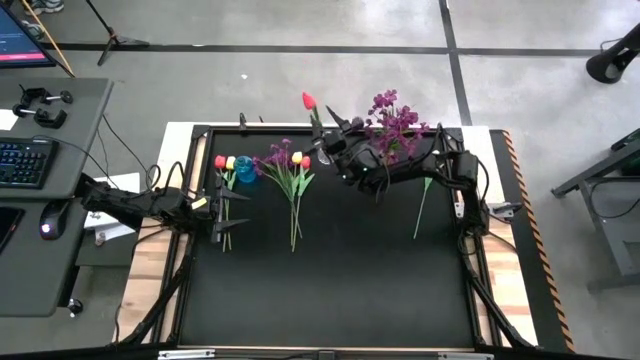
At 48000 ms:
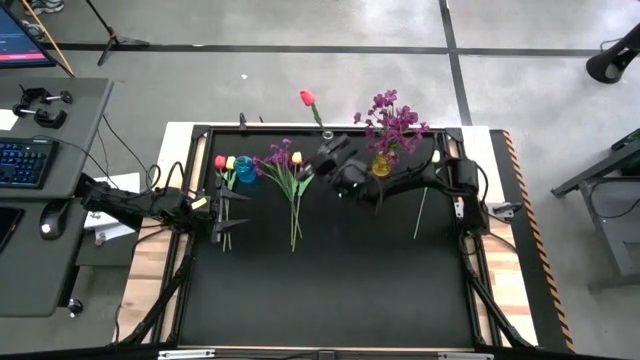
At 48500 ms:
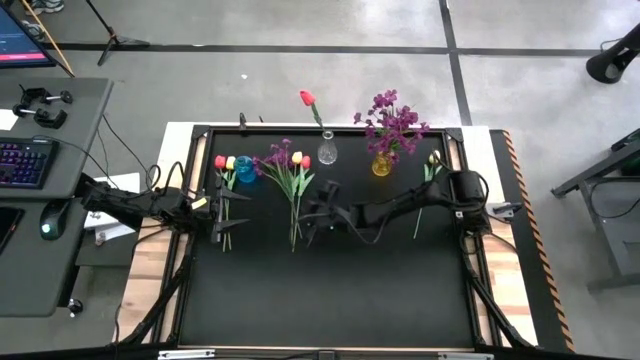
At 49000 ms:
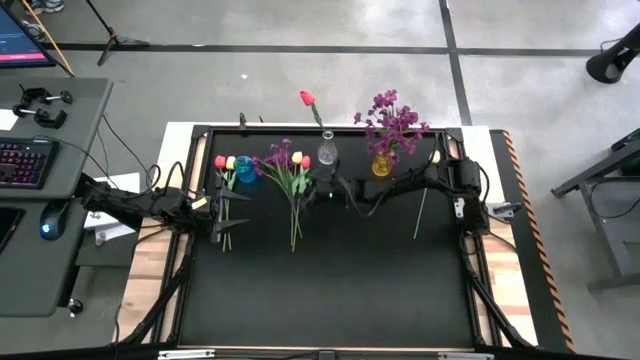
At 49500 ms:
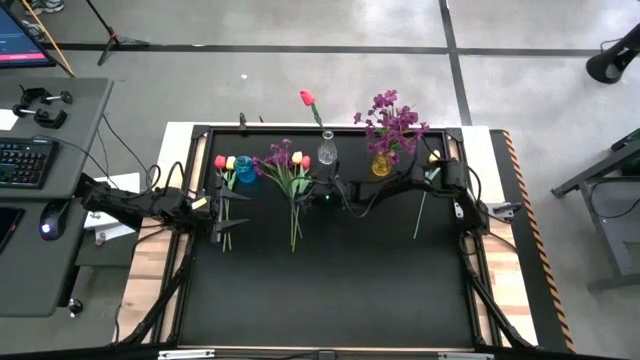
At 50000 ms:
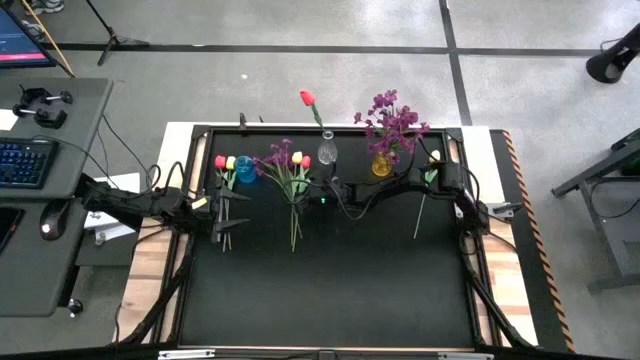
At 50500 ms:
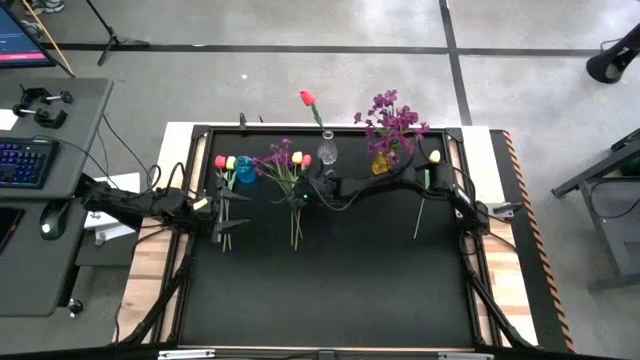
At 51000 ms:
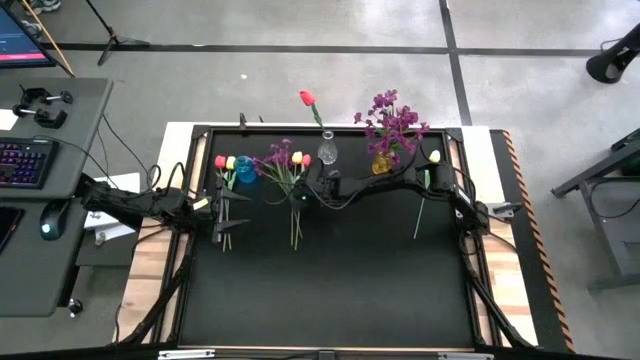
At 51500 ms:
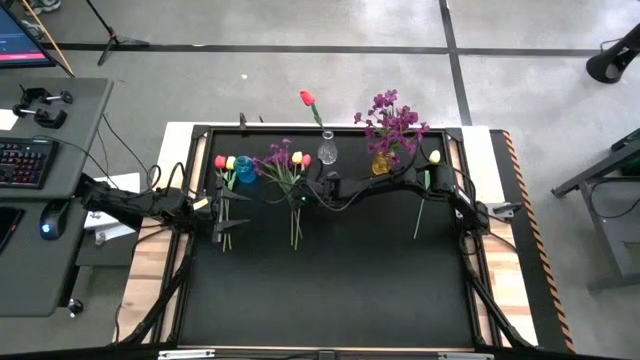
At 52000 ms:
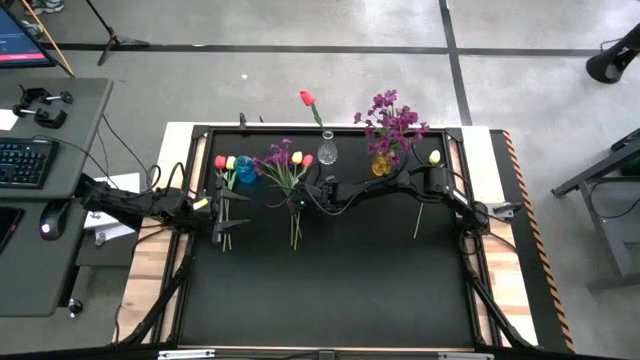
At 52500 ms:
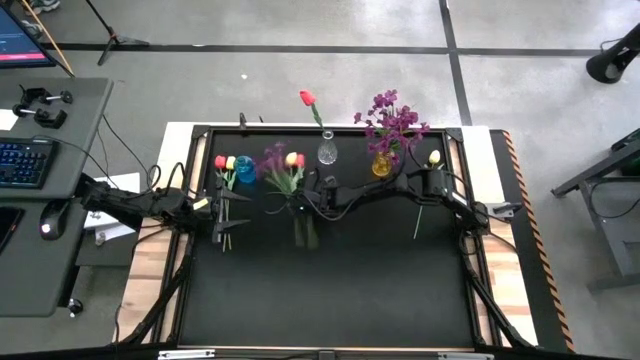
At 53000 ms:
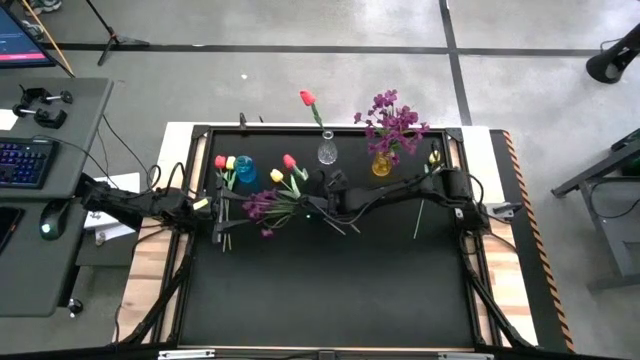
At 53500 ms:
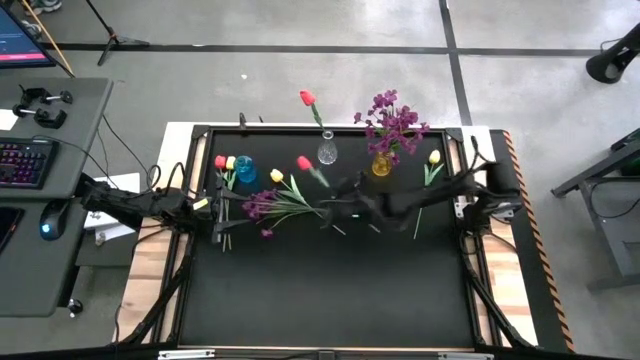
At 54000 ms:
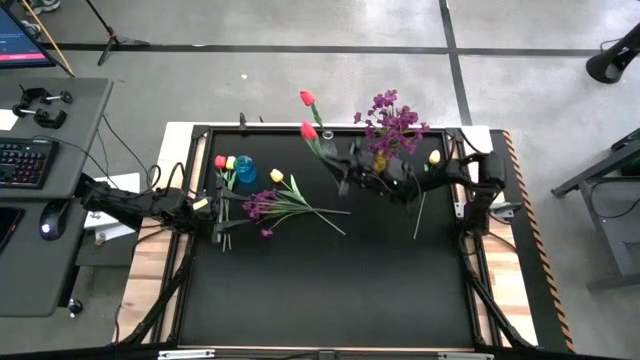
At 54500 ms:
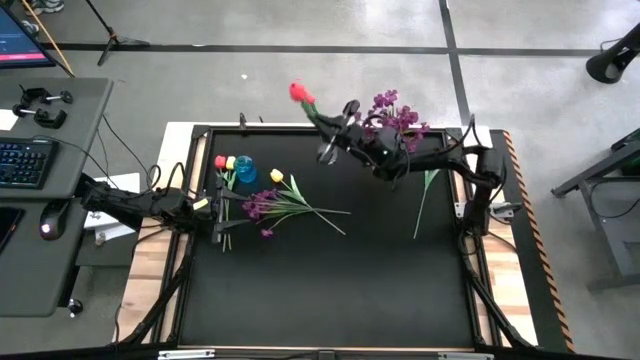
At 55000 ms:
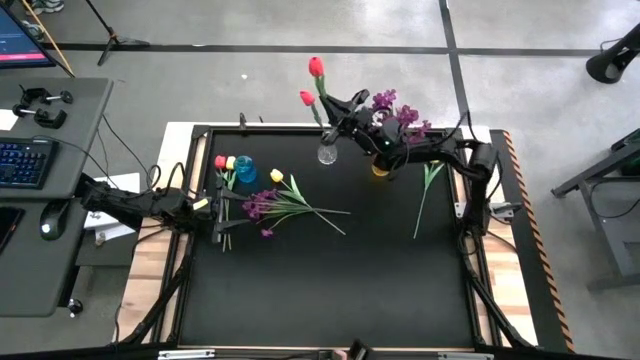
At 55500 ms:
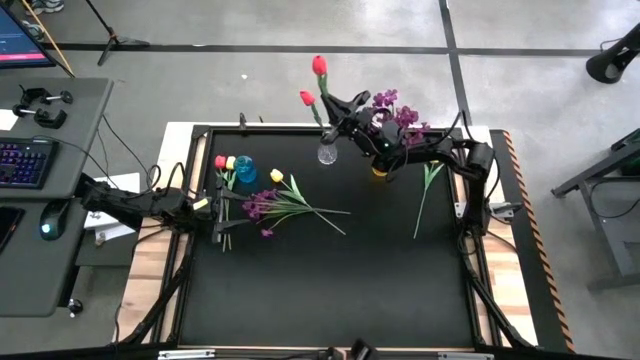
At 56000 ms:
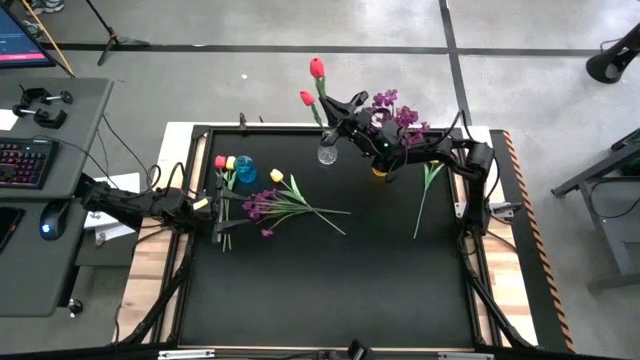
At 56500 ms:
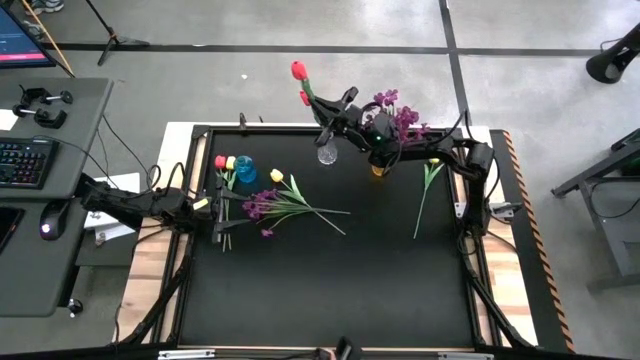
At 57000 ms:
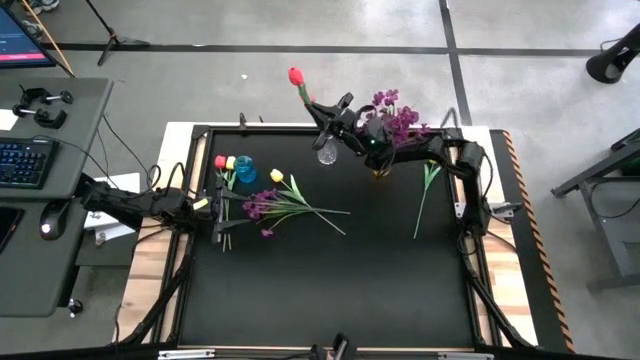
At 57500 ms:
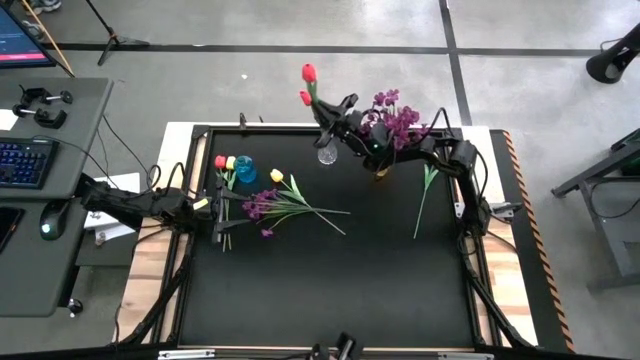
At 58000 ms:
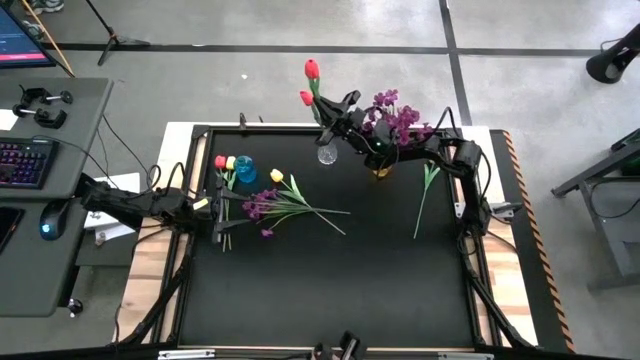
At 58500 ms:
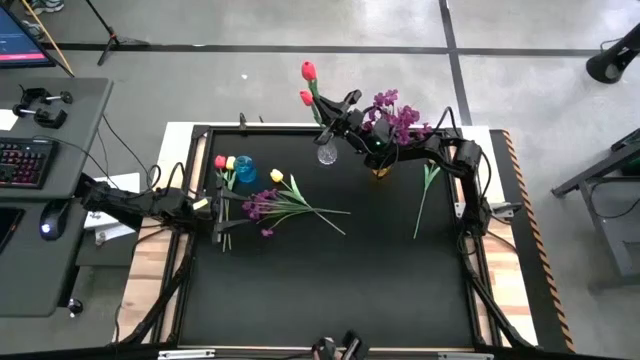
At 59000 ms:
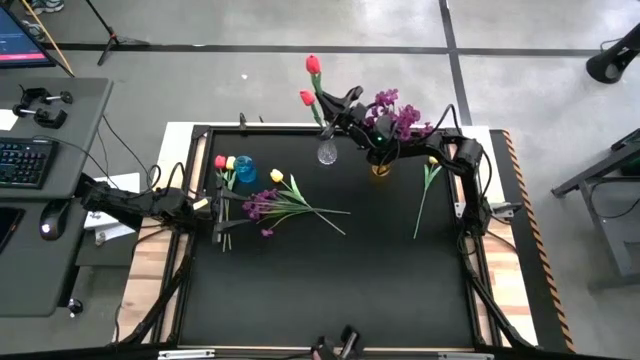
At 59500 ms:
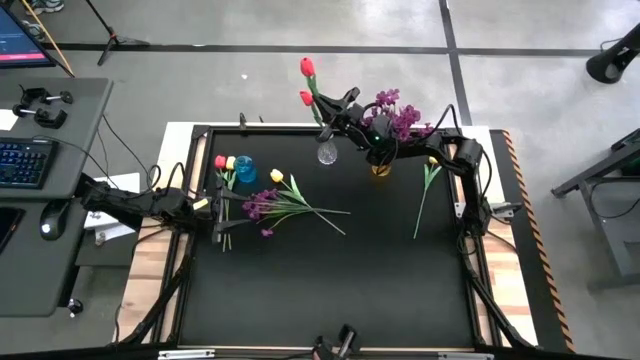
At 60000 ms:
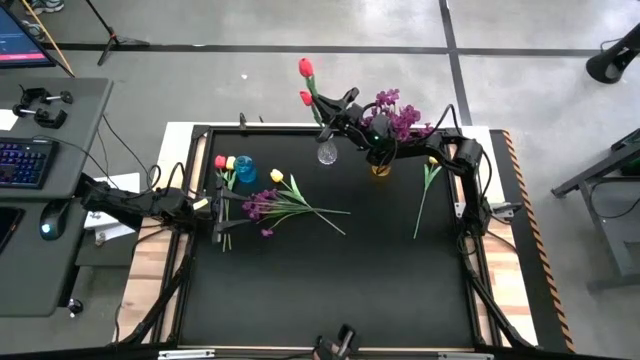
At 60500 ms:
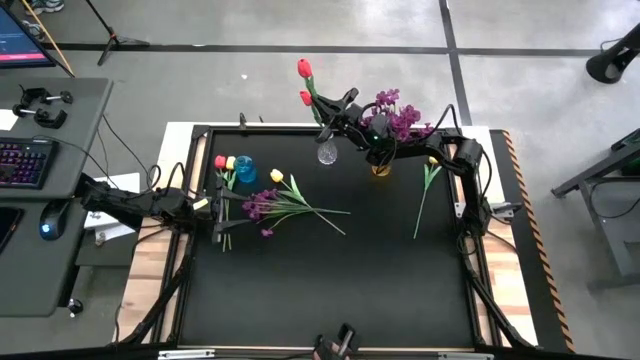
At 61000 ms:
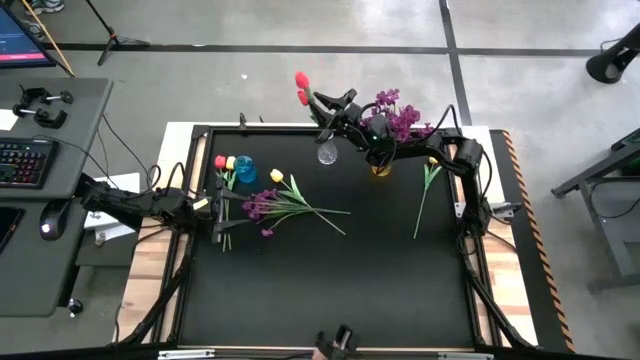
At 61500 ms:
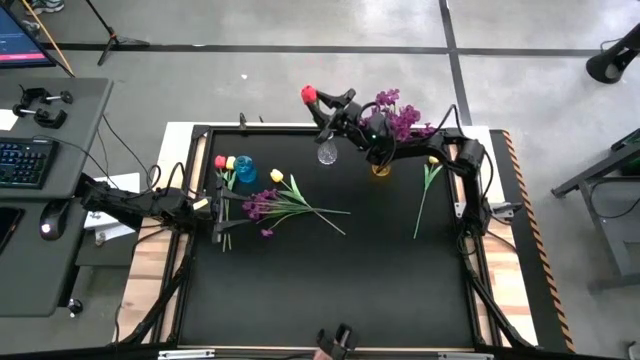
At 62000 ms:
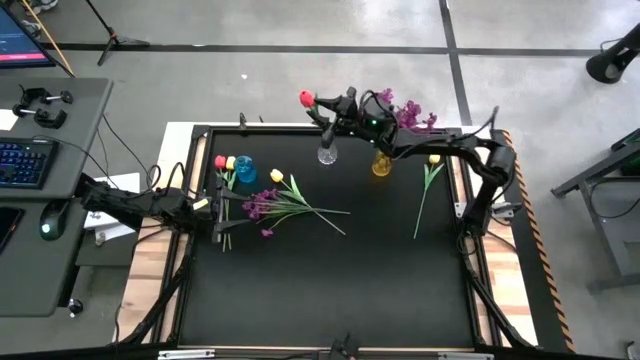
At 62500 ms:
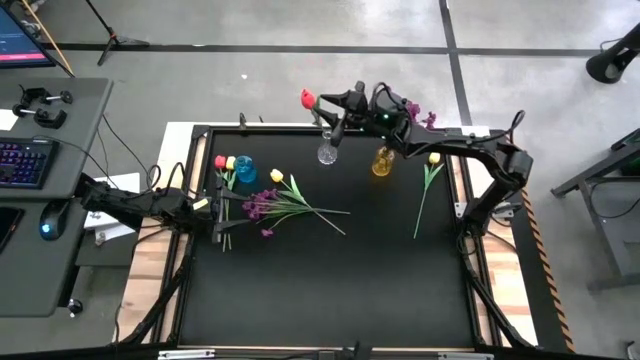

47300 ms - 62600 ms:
Task: Sort flowers into vase by color
Put the right pink flower into the transparent vase

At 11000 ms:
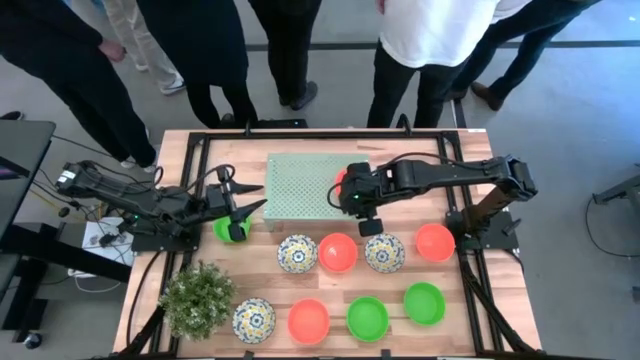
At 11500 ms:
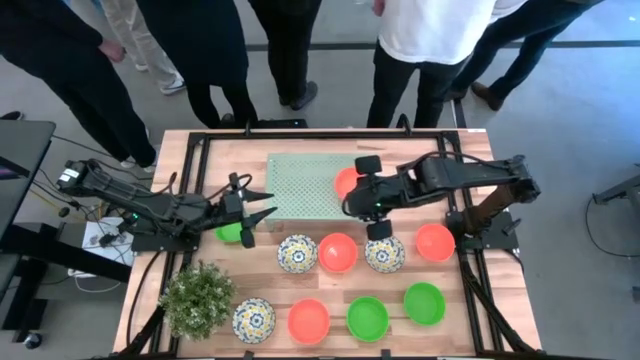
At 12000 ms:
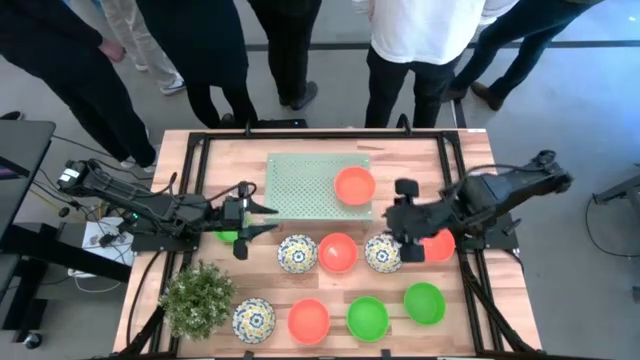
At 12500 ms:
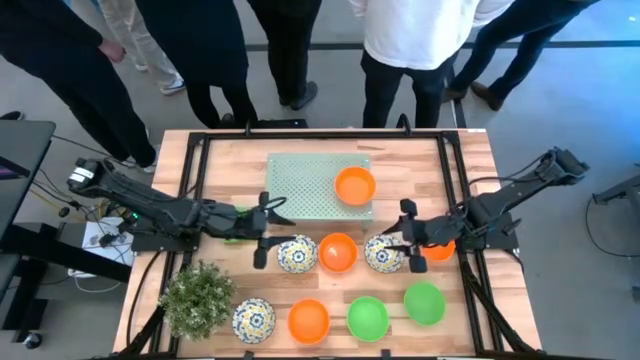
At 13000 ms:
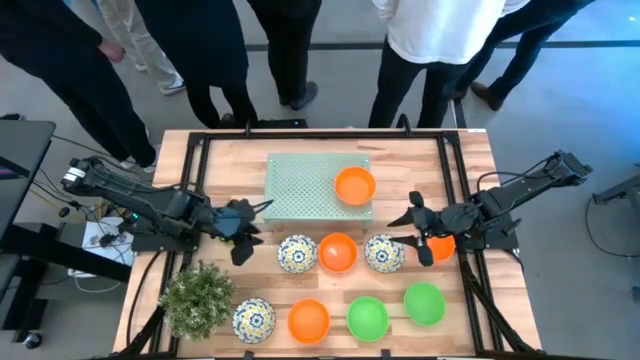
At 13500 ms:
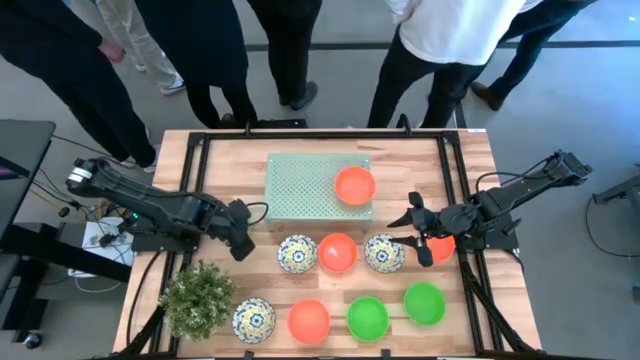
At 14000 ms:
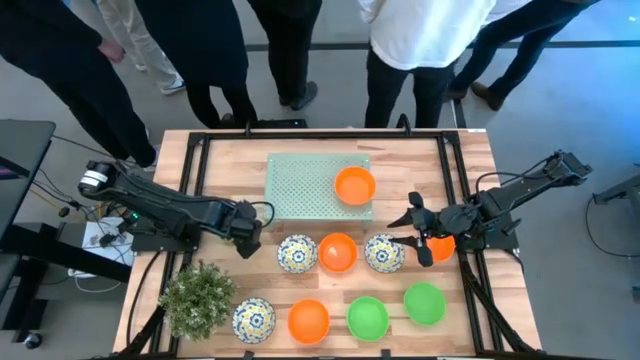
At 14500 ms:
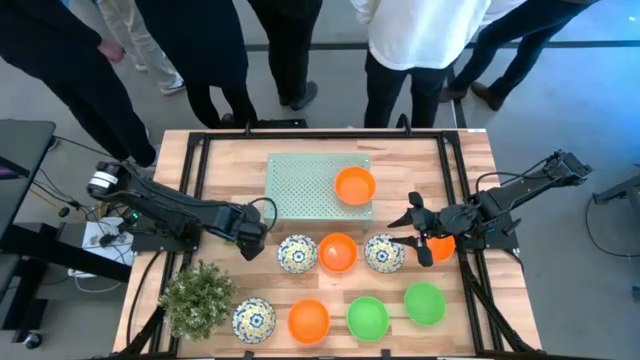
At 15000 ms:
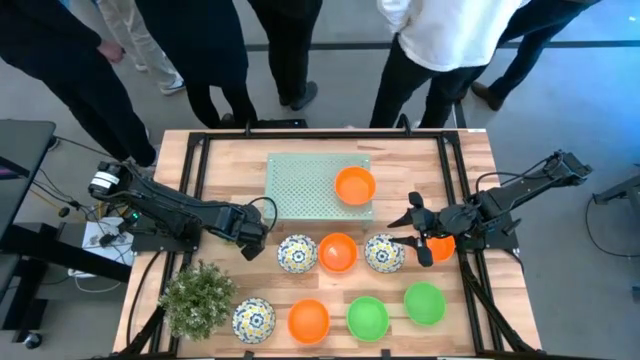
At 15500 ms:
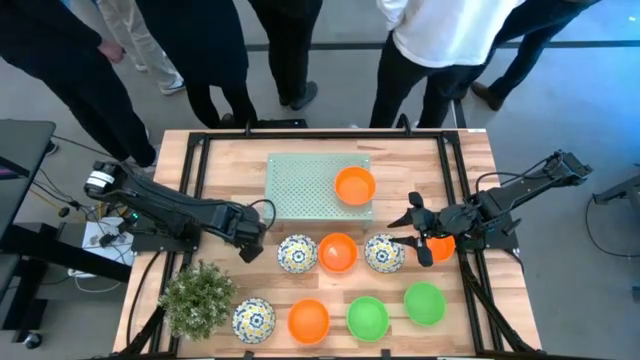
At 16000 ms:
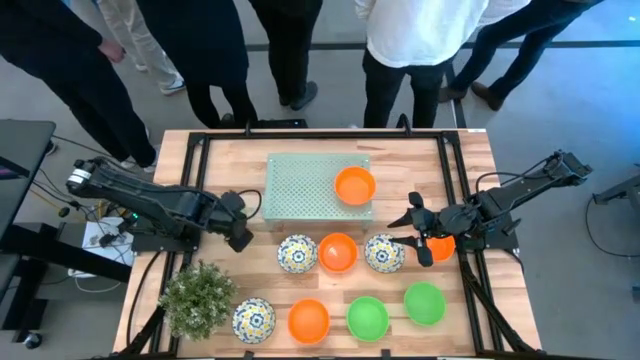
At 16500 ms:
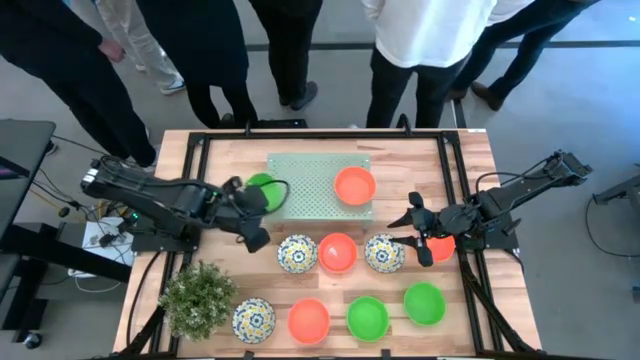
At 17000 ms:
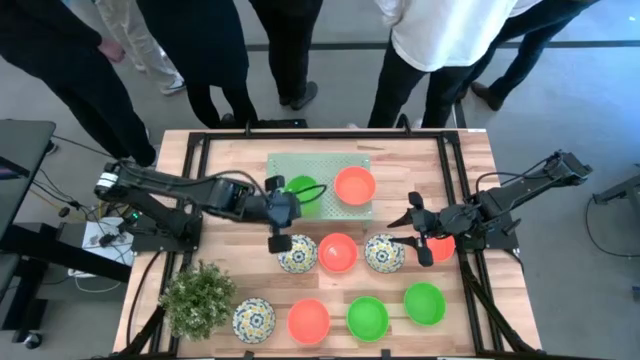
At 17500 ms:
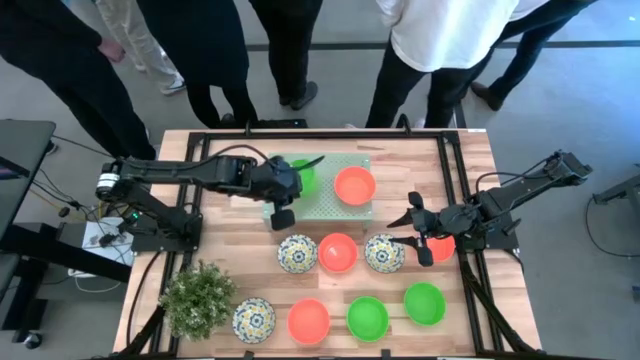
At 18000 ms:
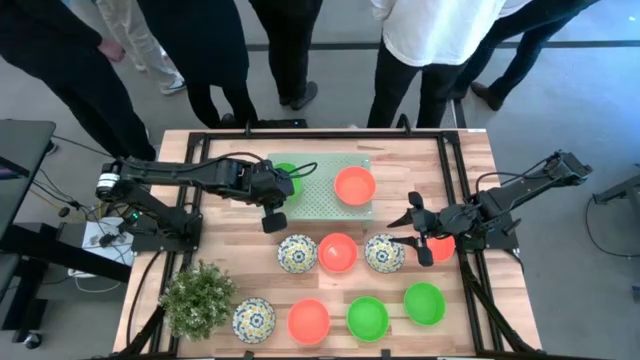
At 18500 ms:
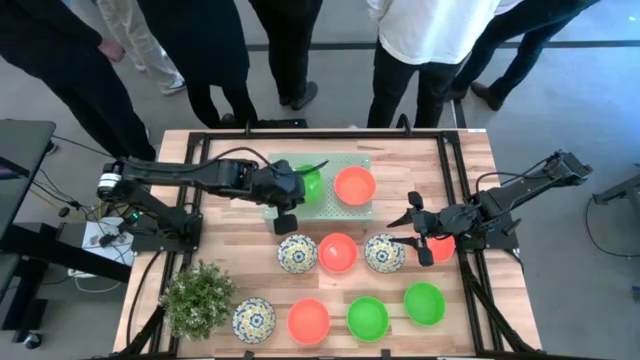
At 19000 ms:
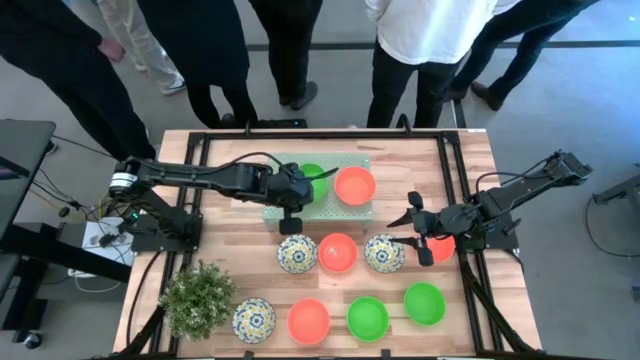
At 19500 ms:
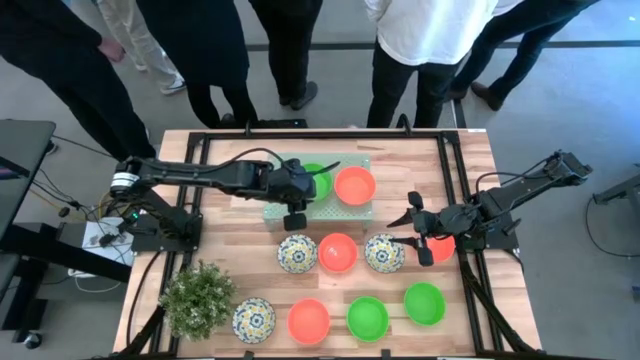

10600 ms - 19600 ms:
Task: Pick & Place Mini bowls
Put the green bowl on the shelf
